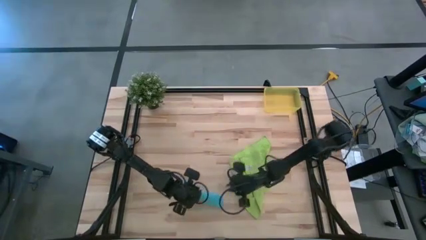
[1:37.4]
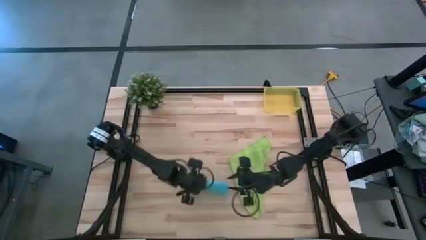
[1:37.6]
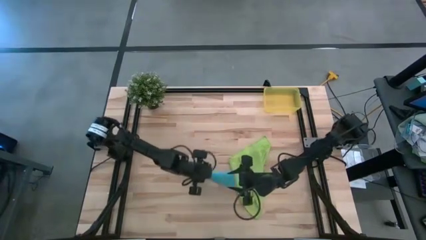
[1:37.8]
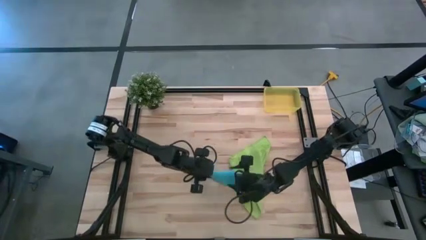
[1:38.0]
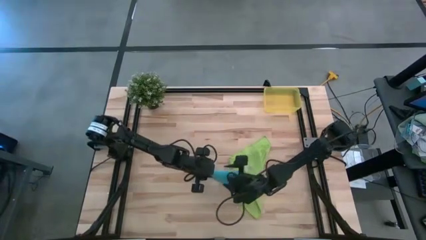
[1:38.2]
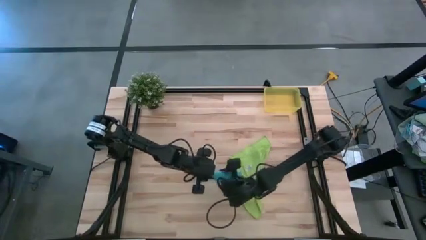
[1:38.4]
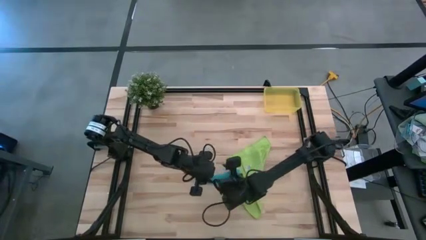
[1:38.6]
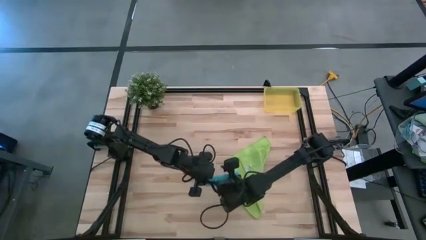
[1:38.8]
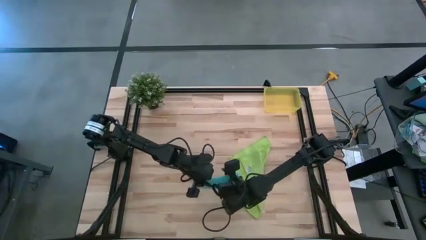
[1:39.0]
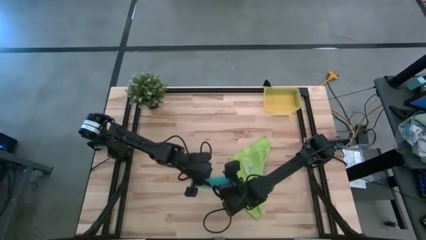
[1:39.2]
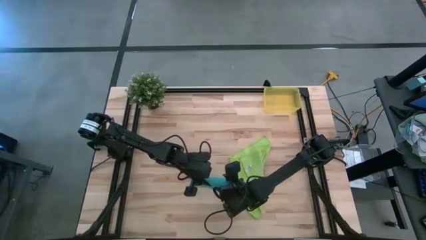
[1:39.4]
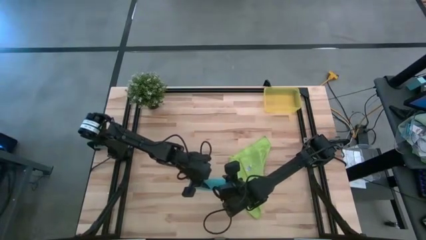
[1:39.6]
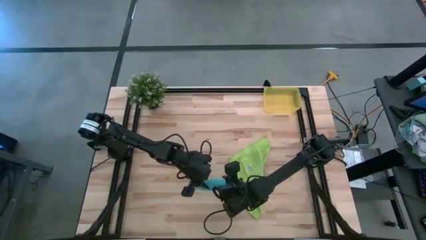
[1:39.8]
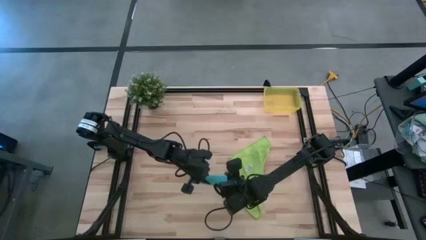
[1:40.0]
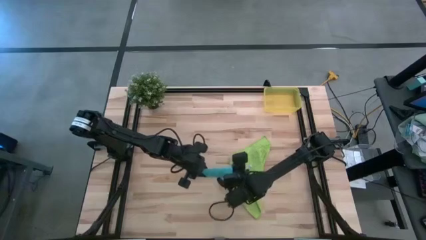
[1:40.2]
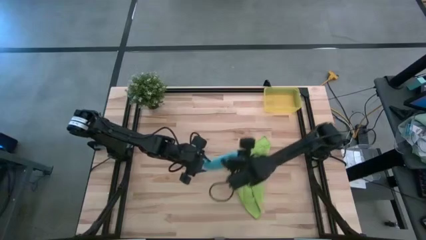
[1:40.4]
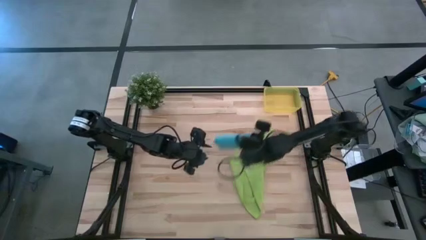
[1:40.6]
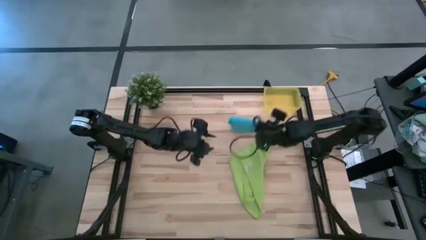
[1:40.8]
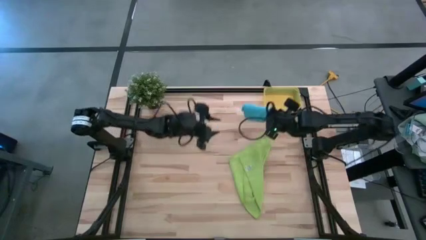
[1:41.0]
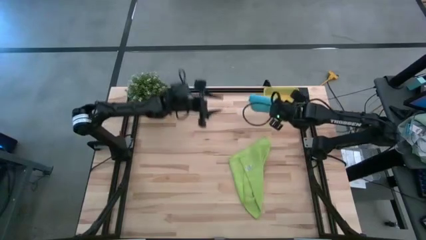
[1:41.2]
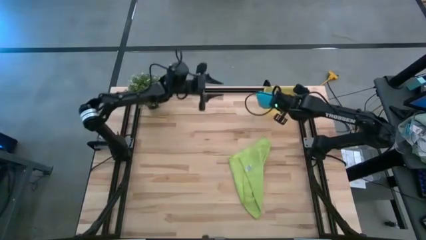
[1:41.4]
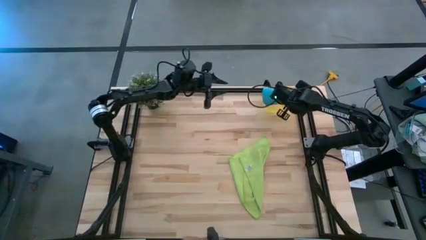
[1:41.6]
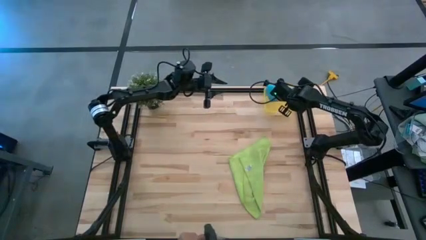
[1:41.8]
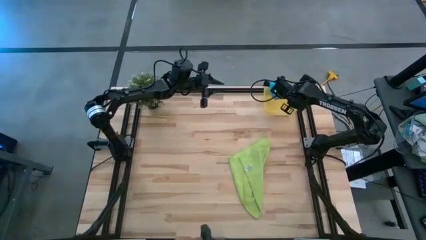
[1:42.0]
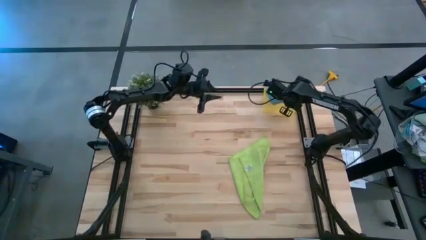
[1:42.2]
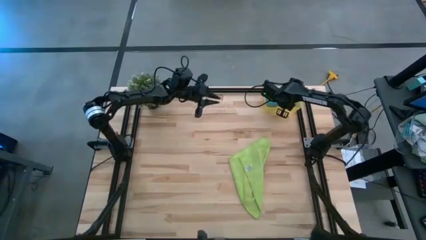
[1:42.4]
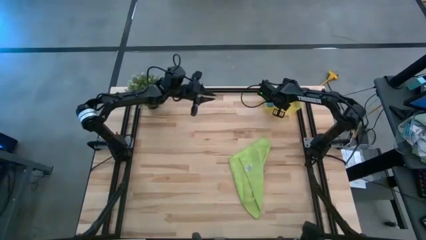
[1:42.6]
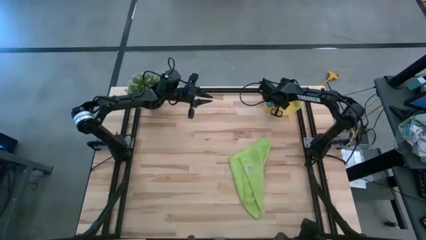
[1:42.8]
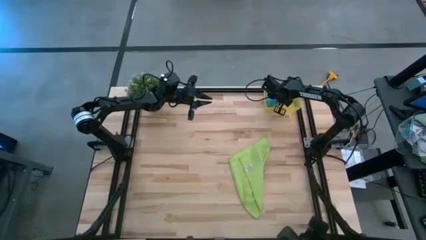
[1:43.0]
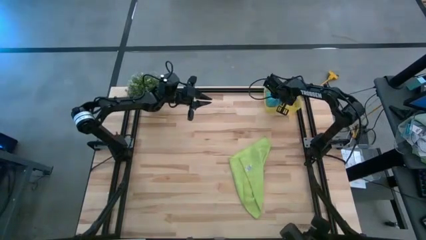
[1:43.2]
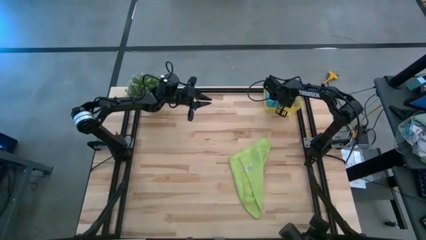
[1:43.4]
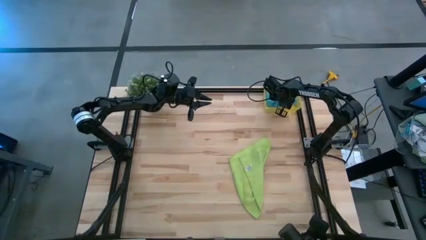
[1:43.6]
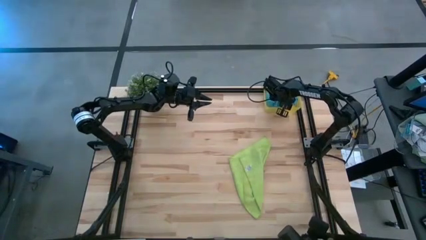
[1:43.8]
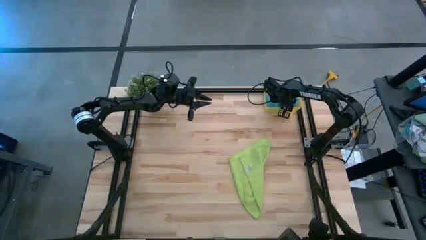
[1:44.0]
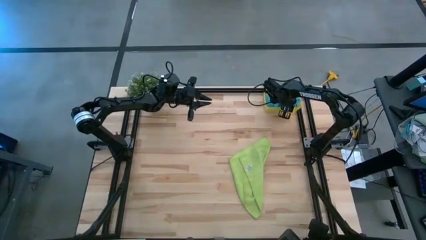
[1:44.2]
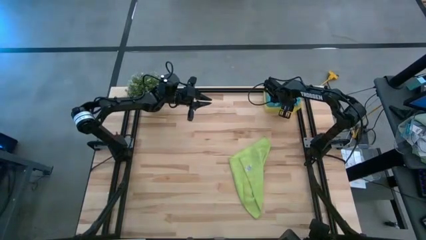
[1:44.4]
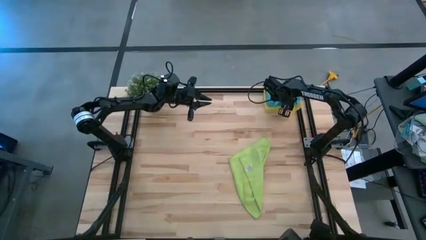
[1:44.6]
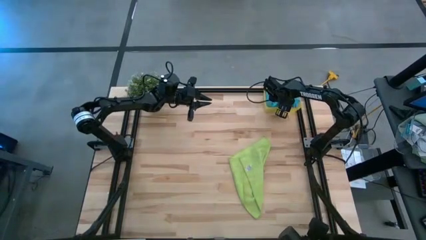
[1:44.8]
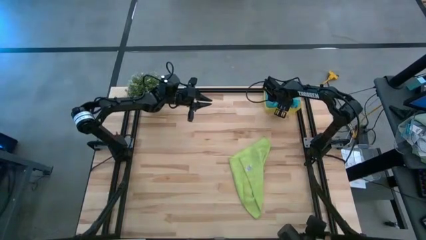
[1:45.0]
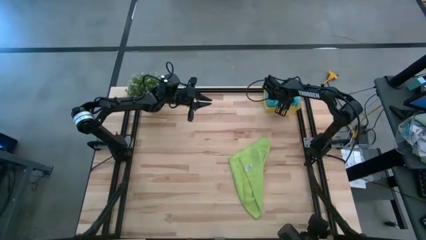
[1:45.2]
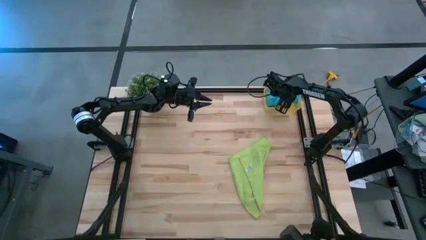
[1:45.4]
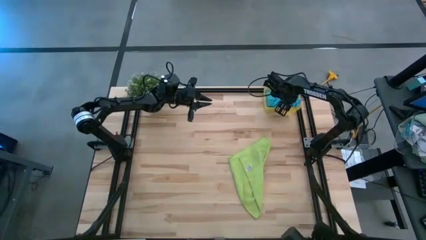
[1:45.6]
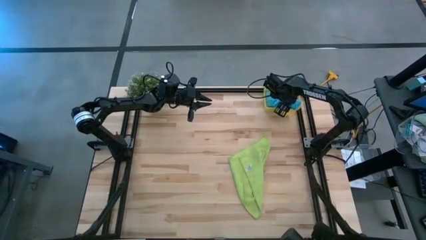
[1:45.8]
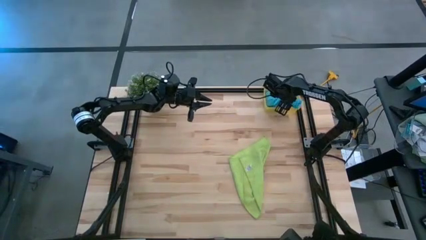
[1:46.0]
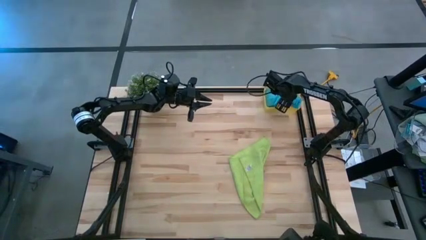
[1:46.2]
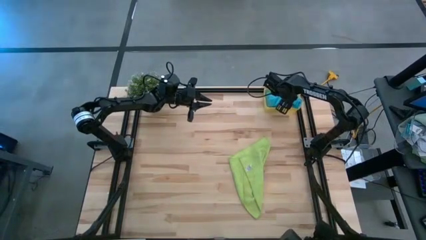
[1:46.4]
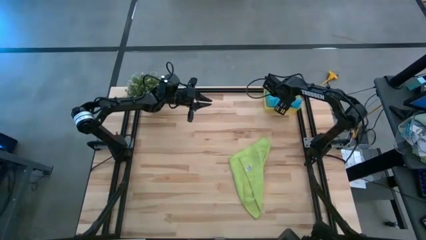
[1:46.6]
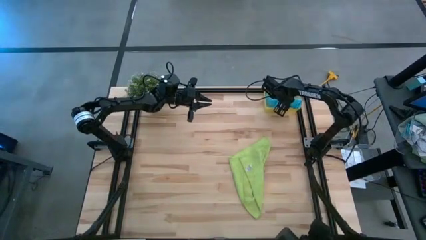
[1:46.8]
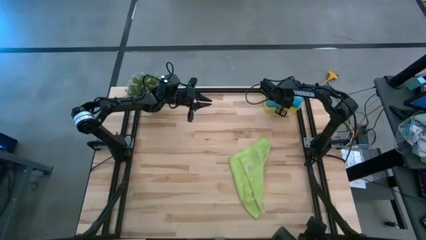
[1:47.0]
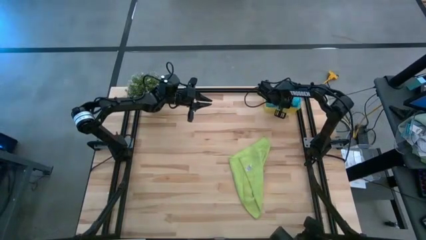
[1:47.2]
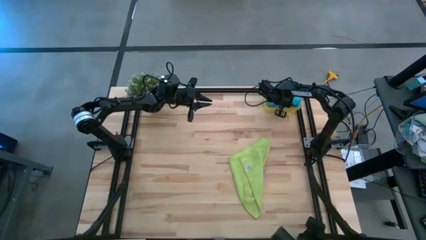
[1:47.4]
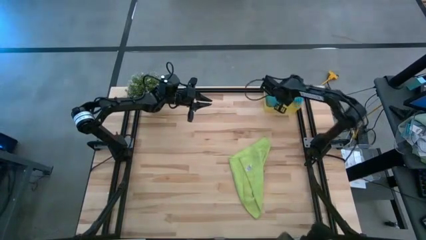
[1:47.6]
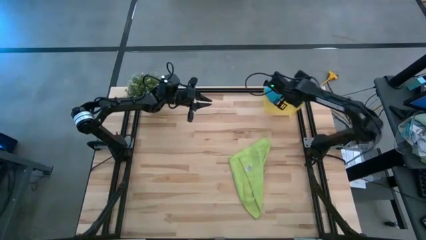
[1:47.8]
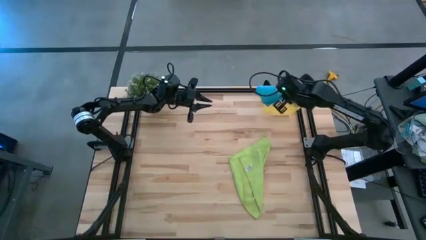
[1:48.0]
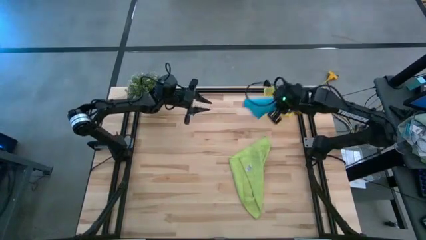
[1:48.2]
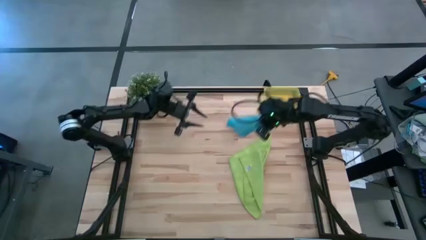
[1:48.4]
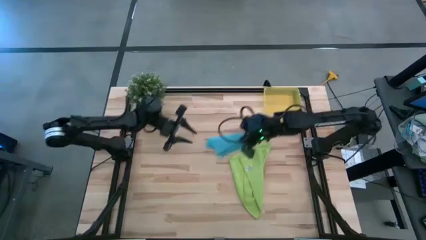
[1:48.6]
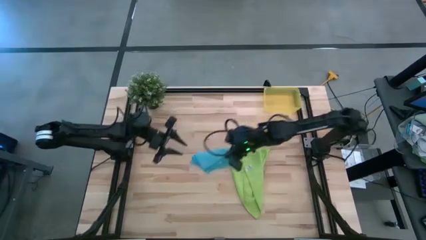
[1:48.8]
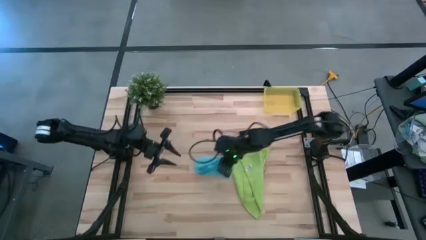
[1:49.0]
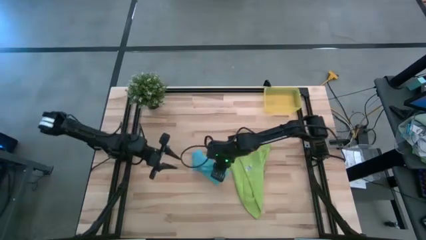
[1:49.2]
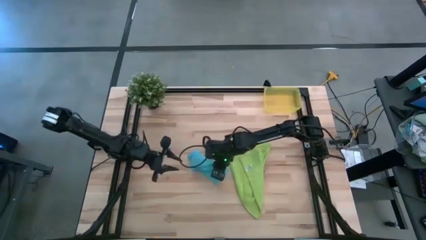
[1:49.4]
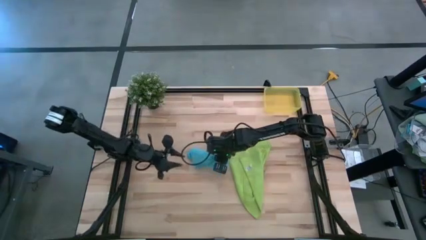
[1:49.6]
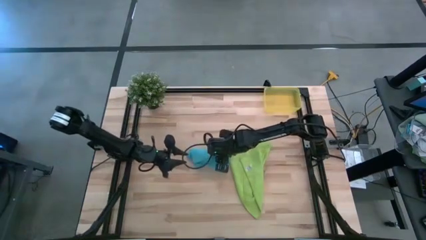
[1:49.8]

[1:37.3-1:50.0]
Task: Roll microfiber towels into tight, uniform cylinder then place into a basket
Put the blue microfiber towel into the yellow bin
